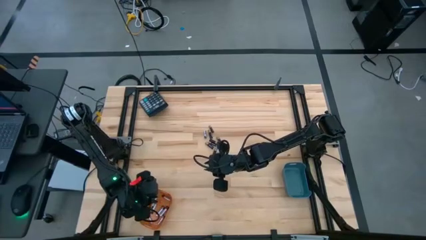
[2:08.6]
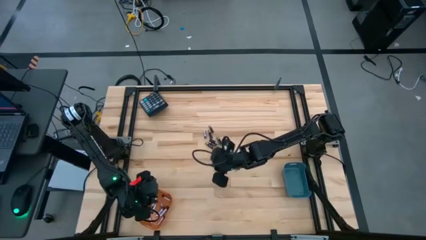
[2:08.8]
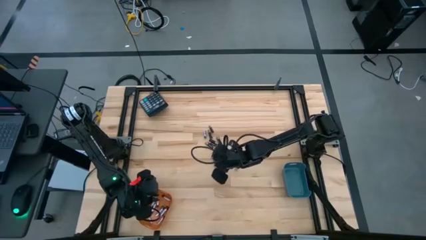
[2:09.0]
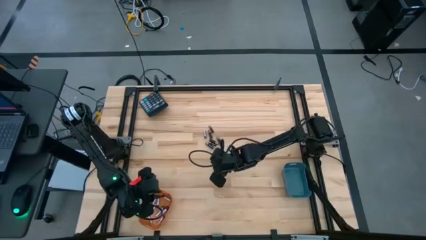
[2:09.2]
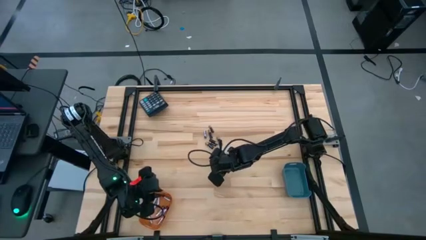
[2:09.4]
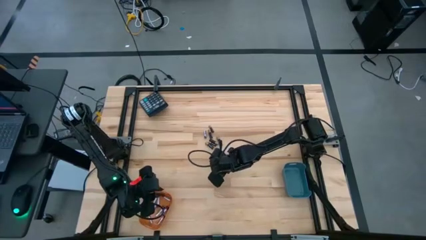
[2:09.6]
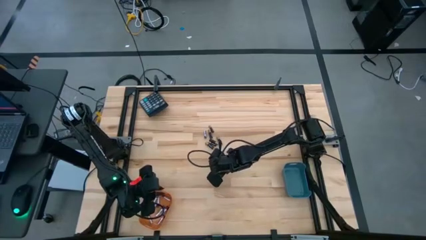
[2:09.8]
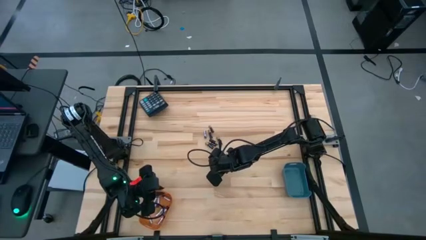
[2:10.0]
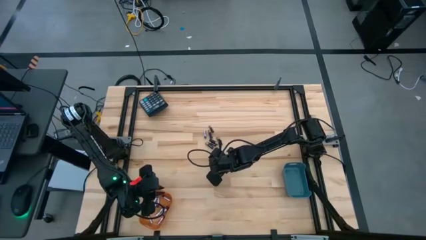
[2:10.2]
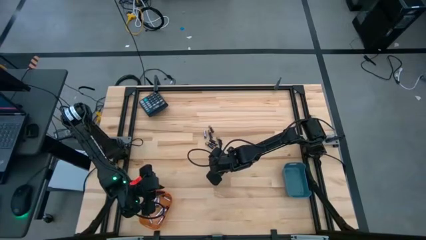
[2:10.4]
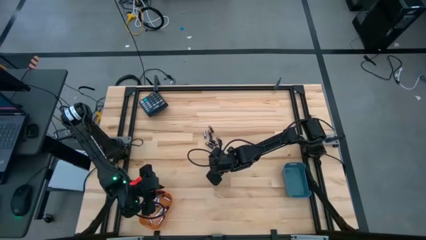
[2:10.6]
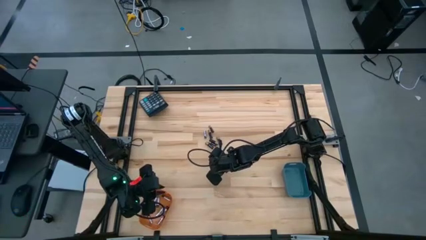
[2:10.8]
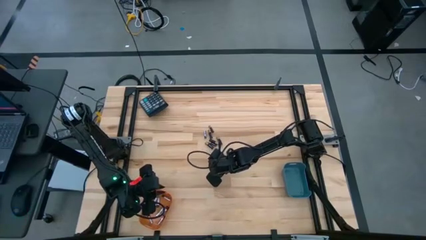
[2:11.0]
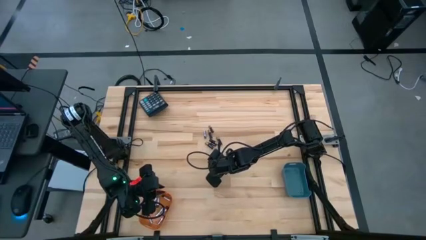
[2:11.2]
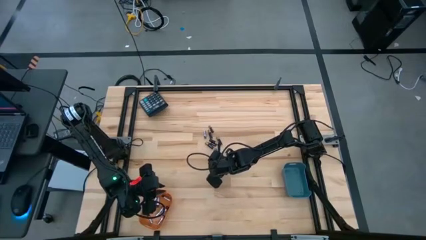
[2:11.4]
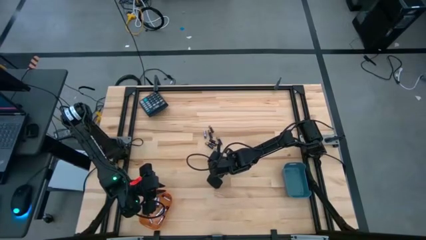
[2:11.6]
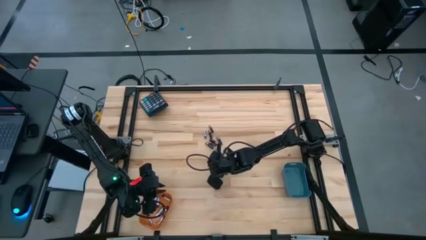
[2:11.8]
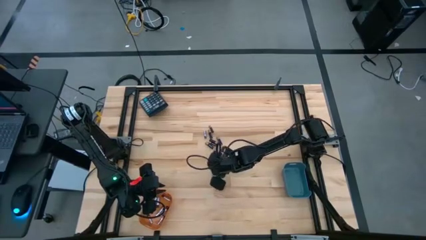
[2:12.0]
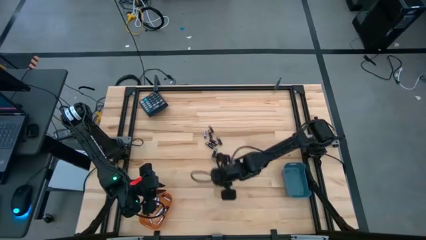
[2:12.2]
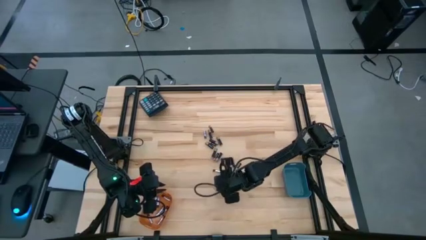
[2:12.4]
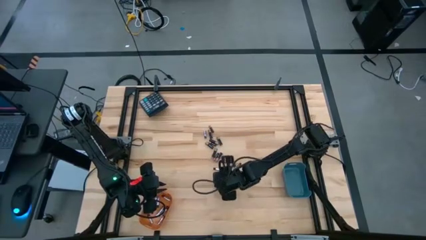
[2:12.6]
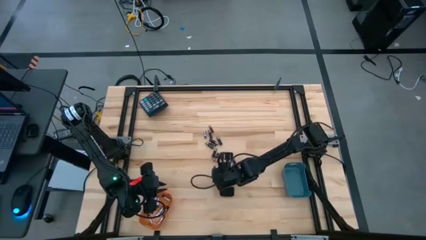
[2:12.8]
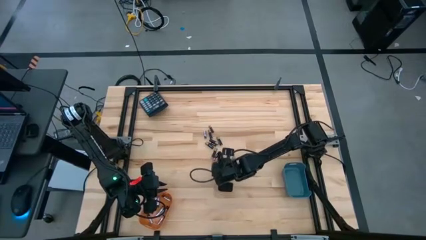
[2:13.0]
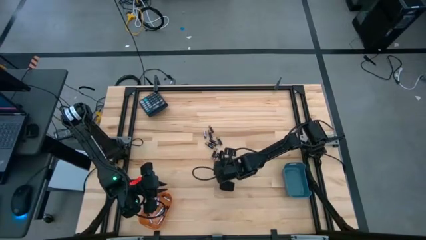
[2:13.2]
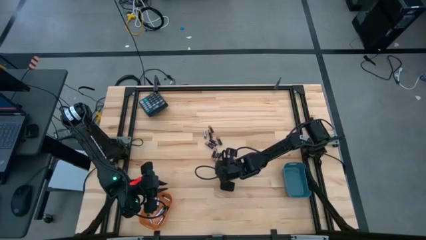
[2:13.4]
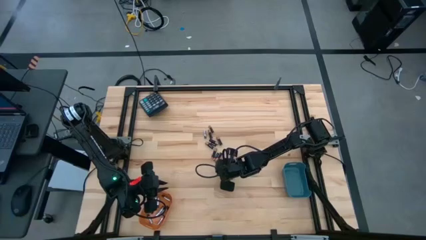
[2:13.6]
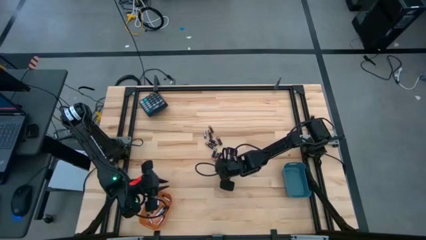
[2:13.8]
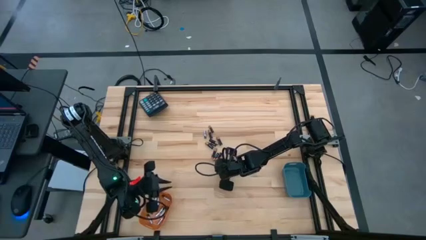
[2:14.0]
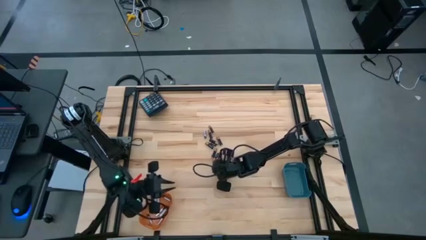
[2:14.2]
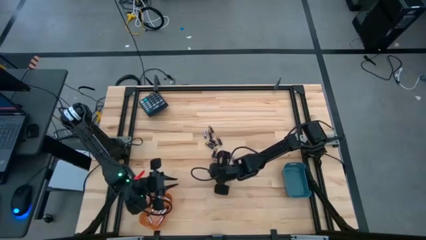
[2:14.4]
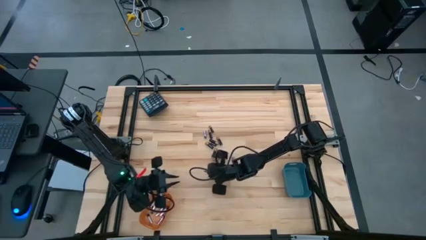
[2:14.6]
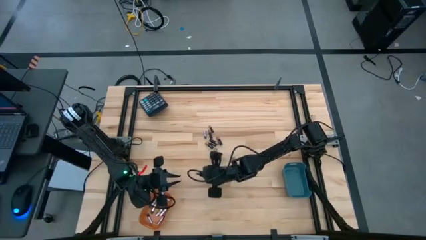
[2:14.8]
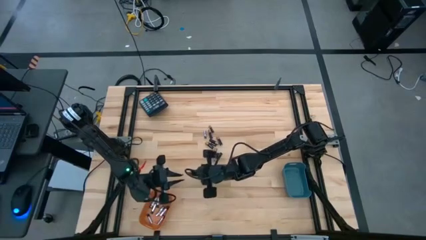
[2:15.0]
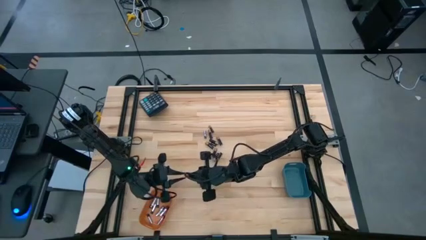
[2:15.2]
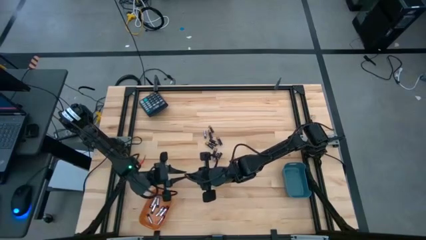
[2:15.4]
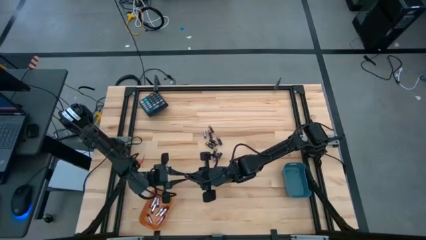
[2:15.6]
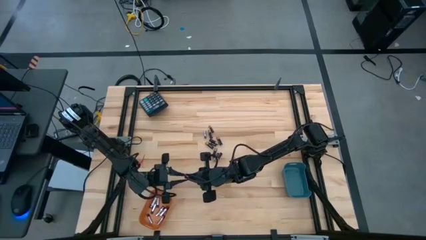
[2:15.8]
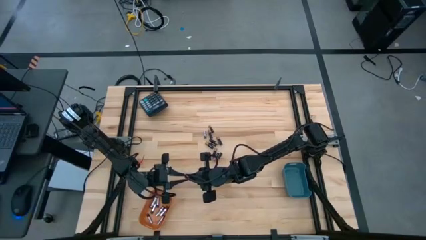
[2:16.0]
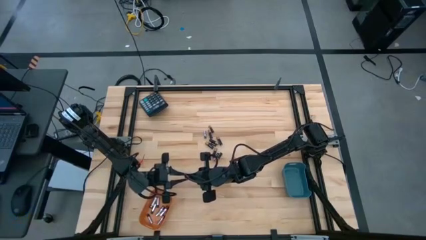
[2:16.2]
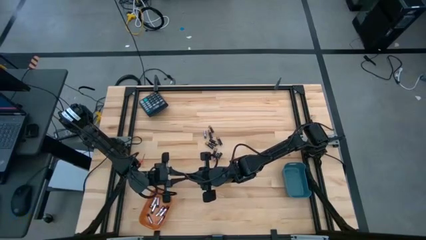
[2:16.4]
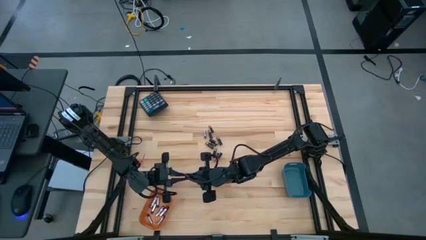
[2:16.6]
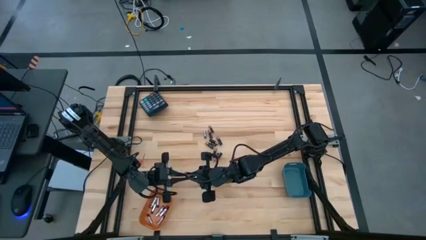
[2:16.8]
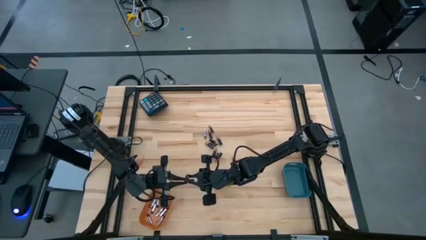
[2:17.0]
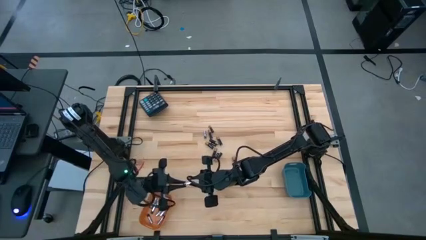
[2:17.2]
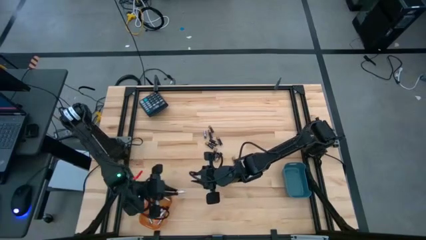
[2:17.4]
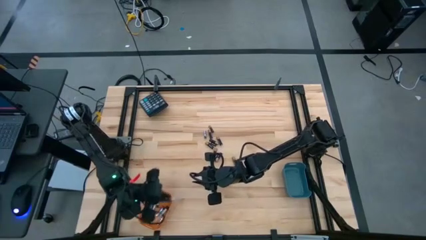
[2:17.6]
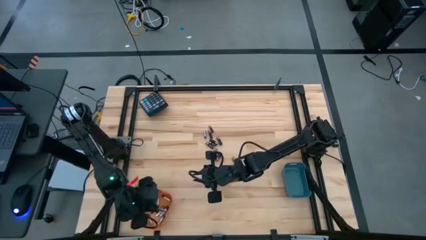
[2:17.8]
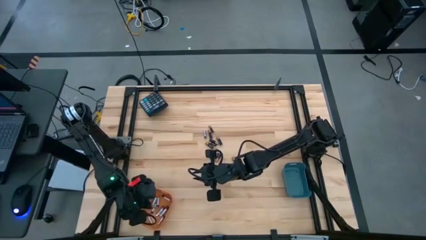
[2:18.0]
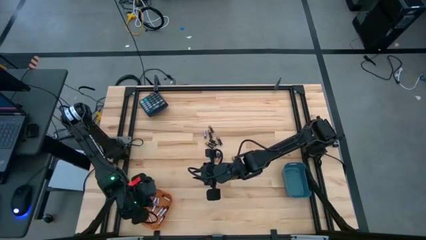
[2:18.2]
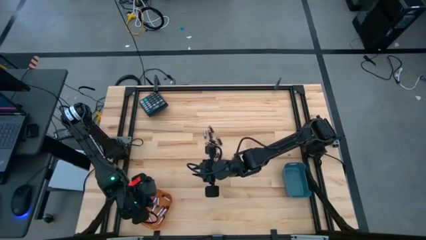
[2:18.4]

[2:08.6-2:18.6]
Task: Sort batteries
Put the silver battery into the orange bin

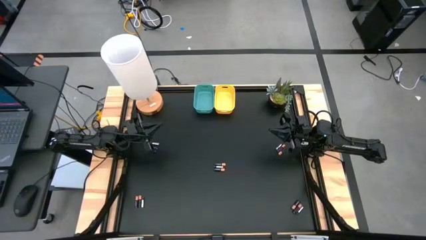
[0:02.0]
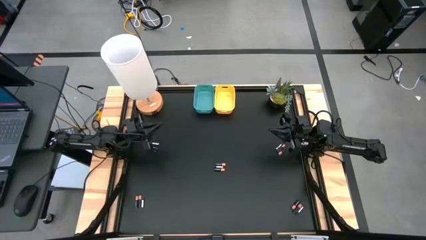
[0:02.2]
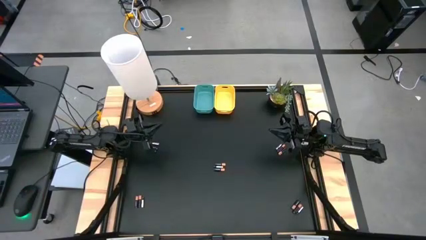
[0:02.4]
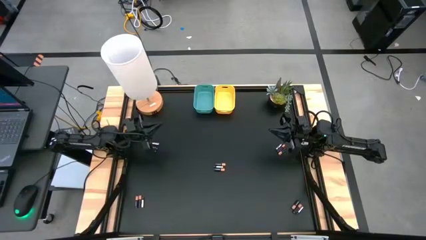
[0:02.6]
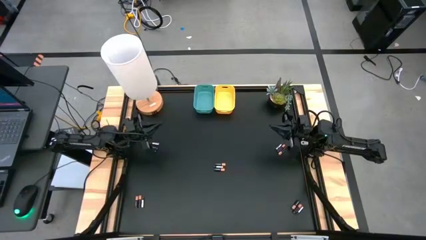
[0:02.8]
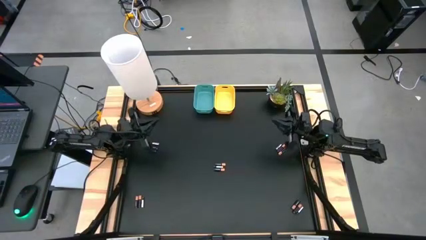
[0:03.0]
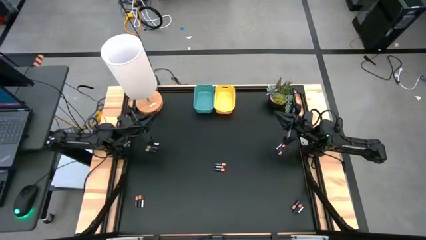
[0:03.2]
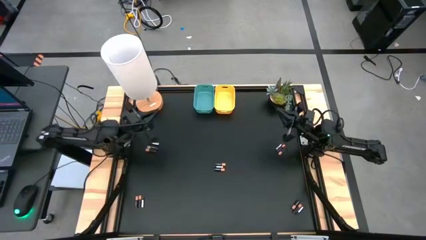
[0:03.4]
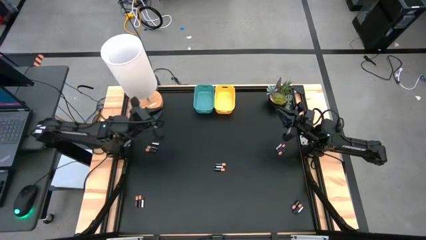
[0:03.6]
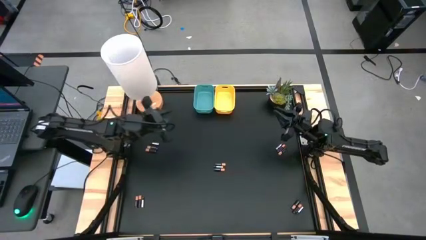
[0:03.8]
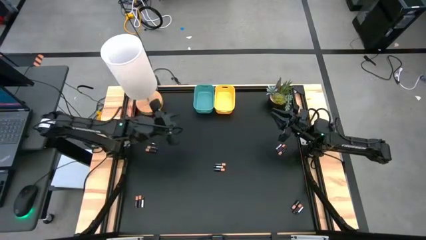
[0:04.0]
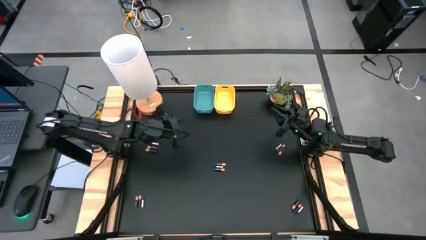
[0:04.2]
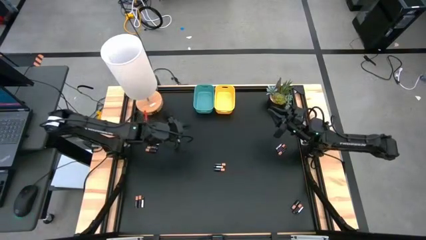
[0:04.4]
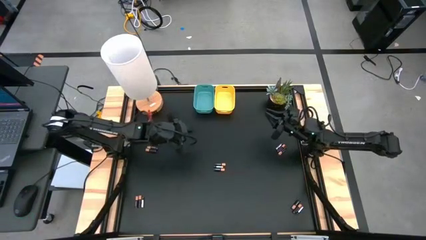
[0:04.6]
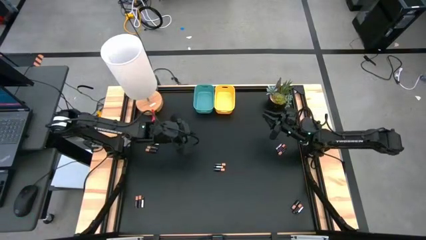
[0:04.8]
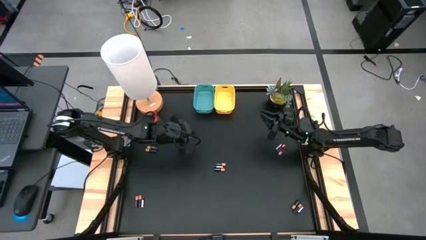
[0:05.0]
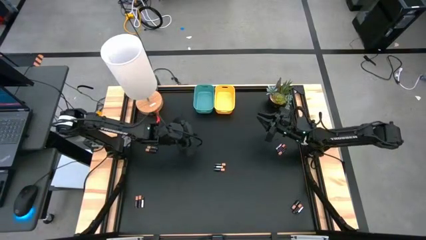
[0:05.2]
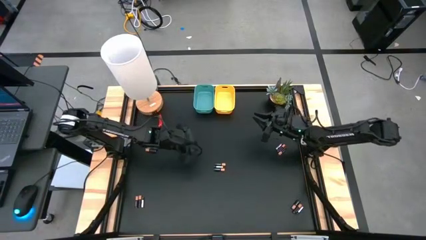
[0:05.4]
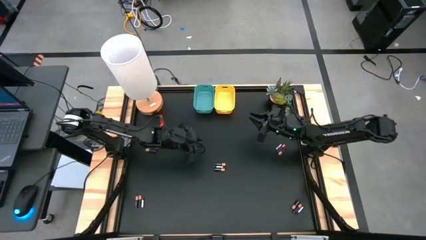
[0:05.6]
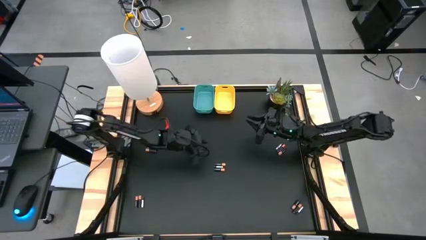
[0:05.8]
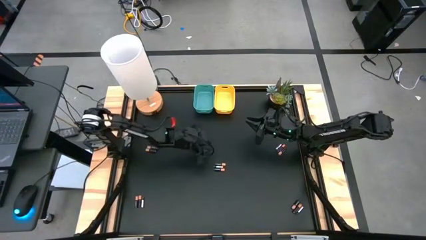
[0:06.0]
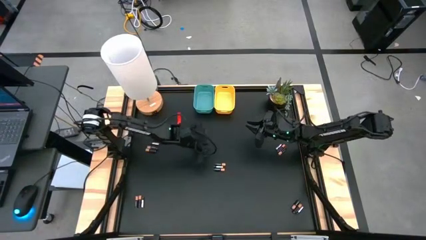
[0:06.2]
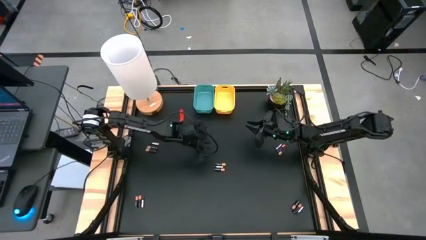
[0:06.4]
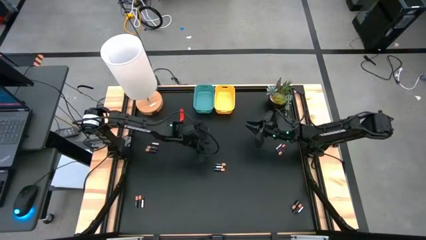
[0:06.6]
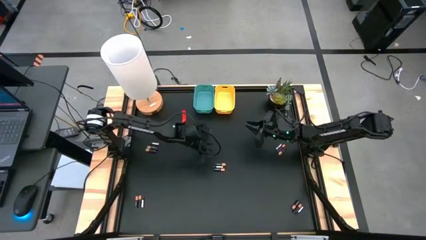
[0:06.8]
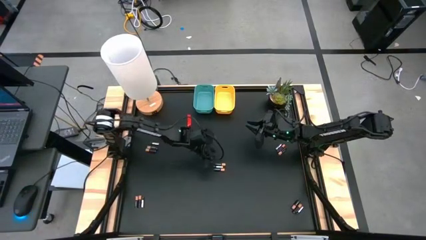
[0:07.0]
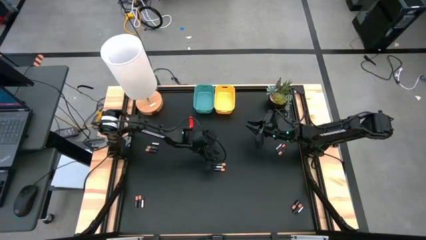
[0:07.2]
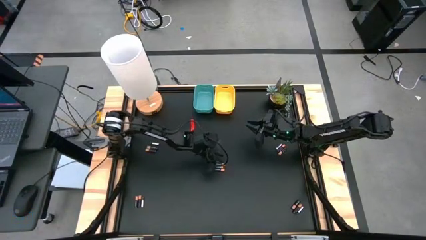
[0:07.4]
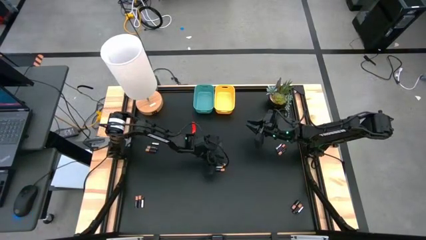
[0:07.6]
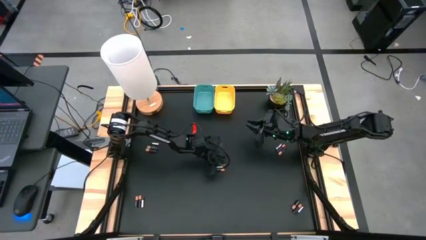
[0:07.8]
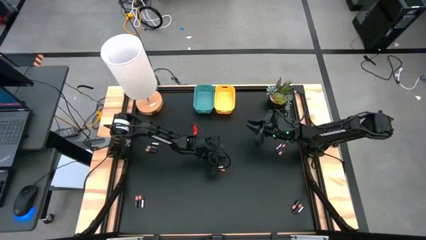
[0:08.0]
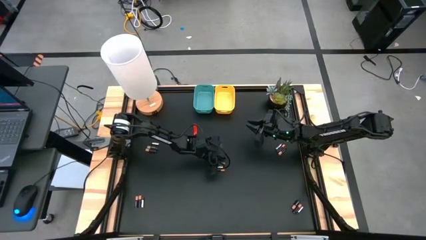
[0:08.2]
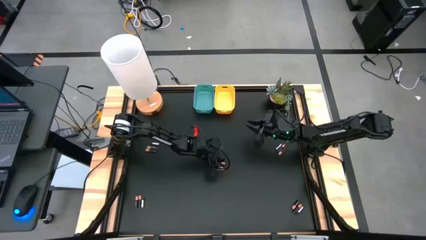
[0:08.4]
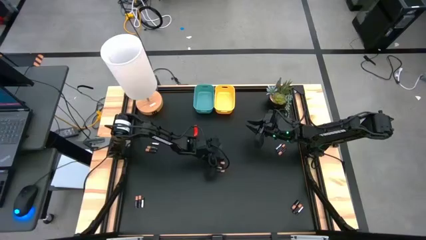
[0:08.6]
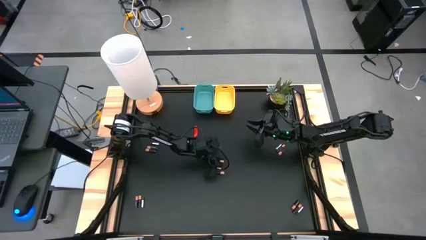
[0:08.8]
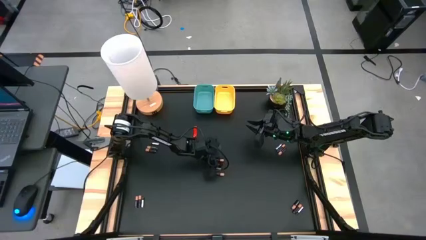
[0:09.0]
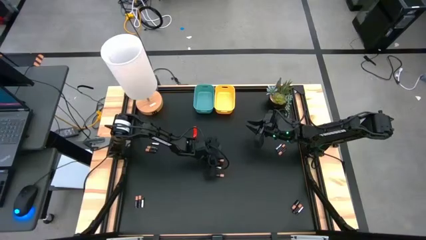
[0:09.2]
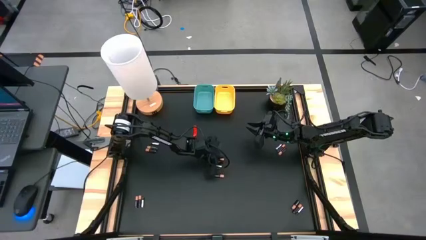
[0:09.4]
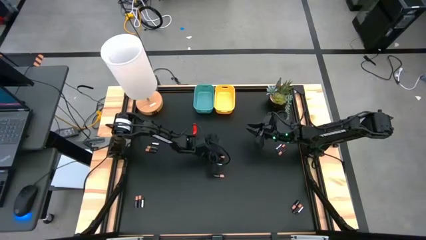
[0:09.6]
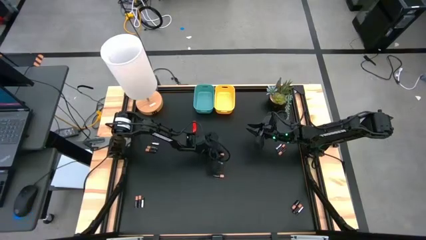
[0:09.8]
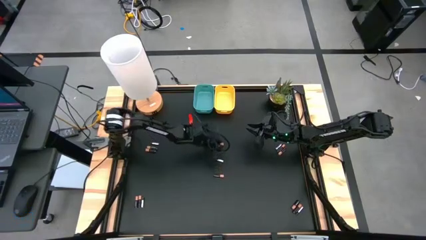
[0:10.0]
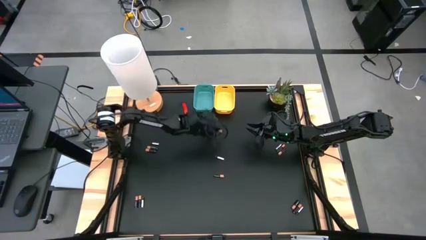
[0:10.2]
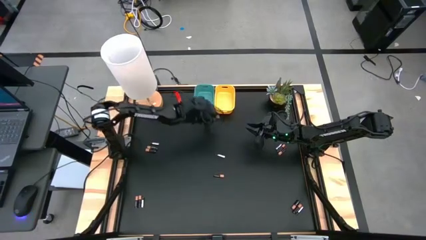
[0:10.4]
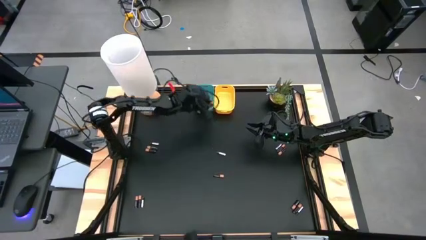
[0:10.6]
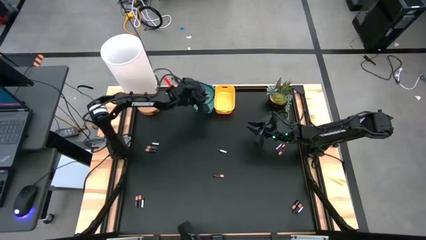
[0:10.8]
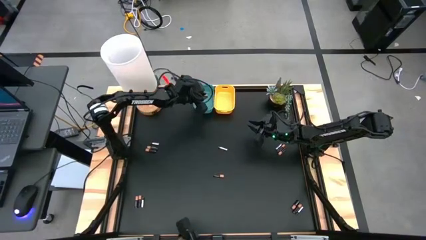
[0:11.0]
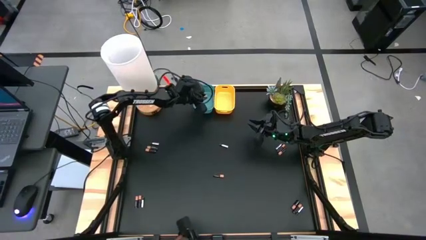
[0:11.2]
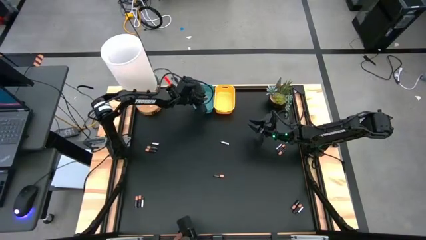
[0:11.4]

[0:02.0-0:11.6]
Task: Sort batteries
Put the gold black battery into the blue bin
